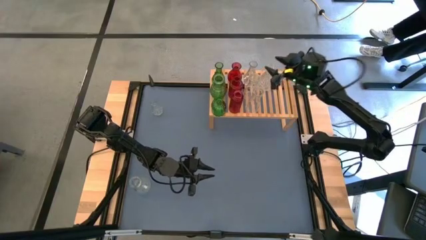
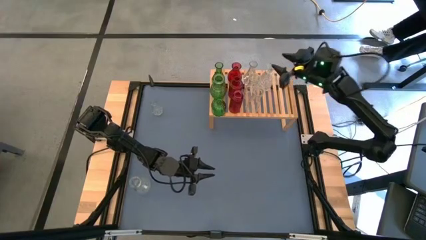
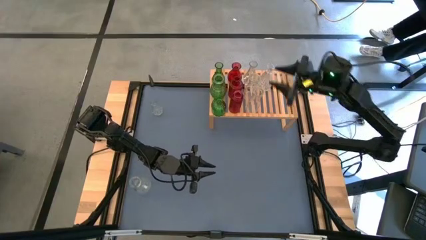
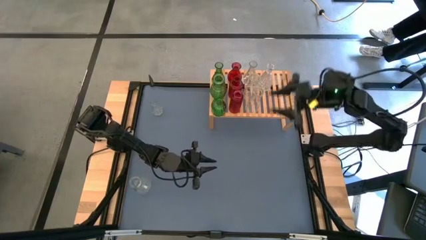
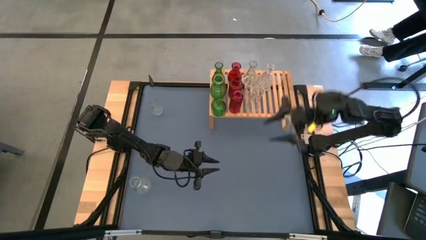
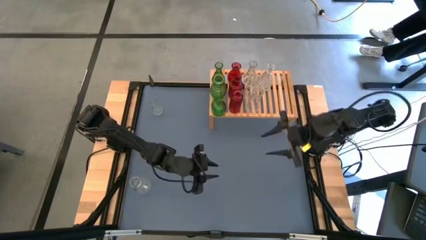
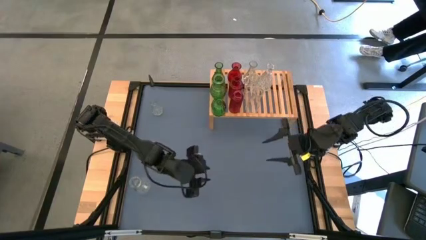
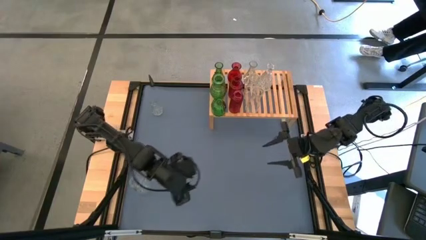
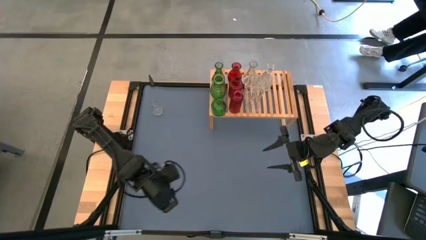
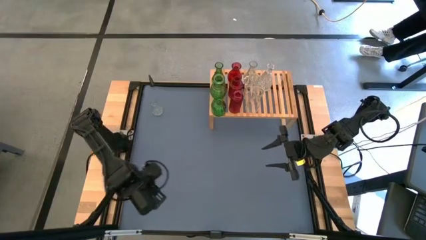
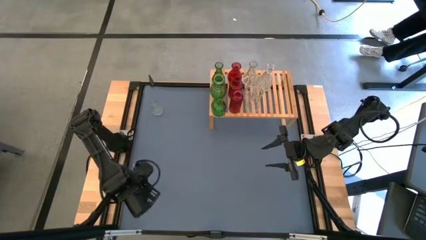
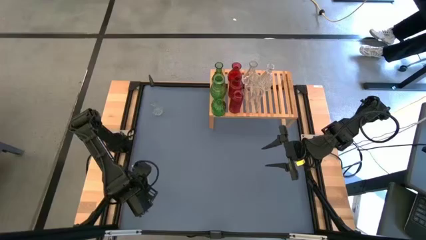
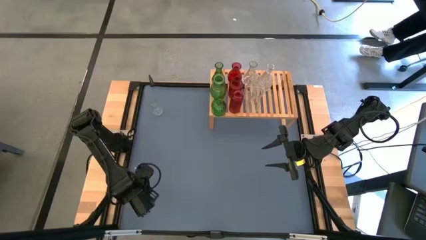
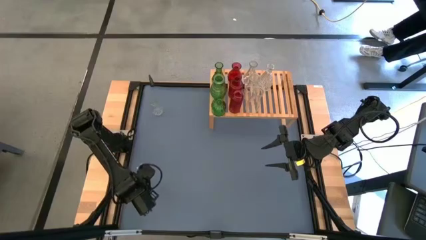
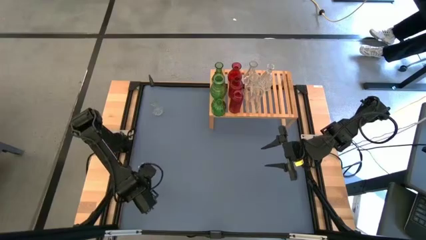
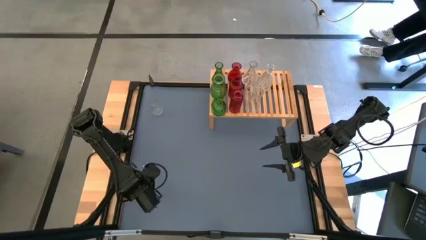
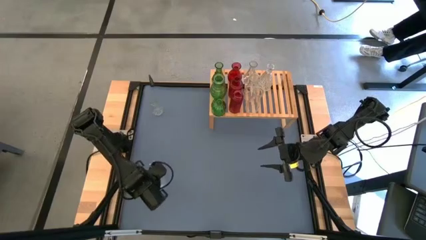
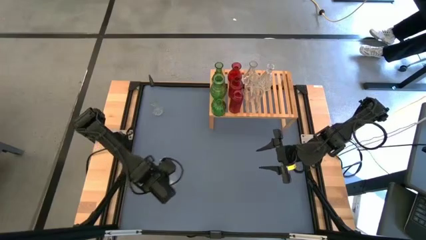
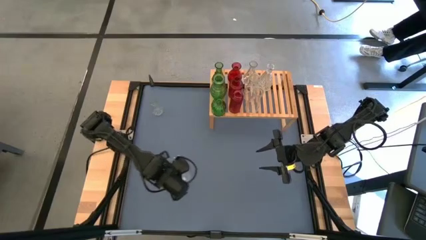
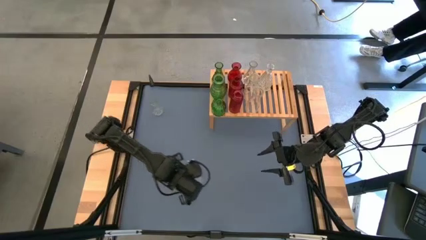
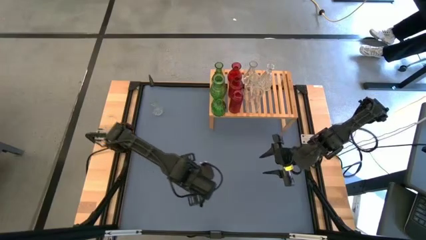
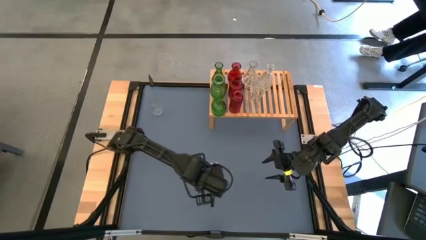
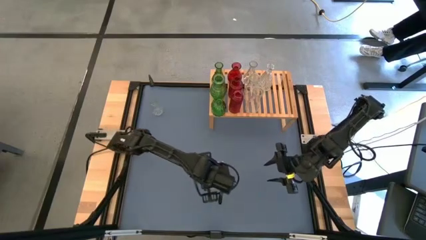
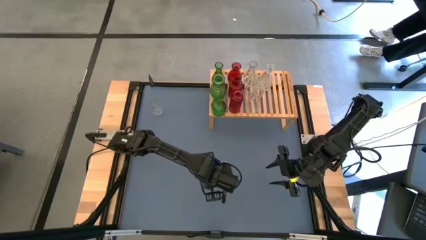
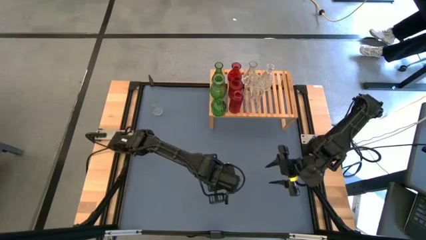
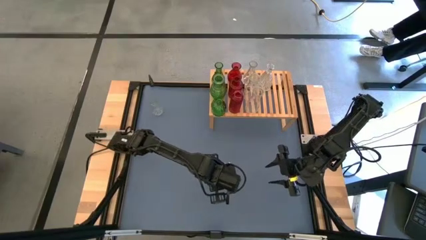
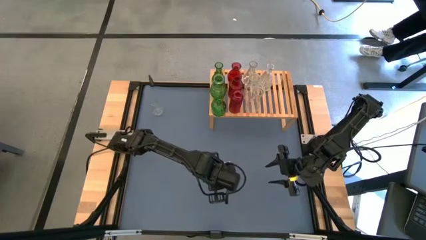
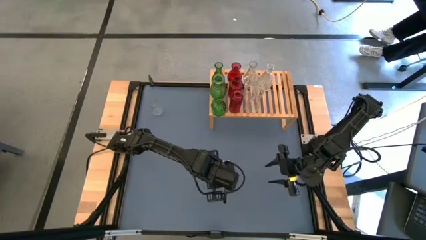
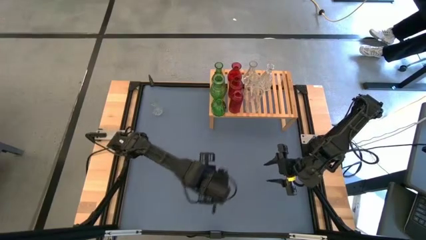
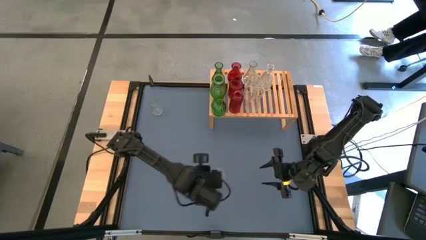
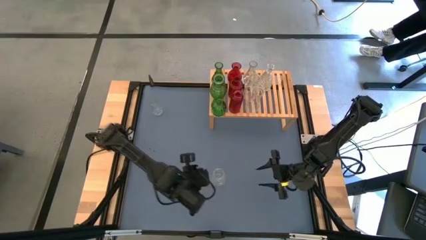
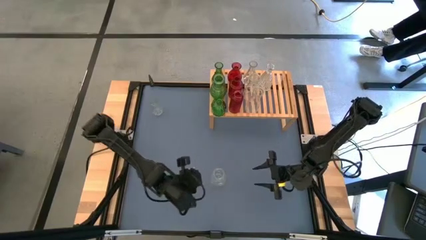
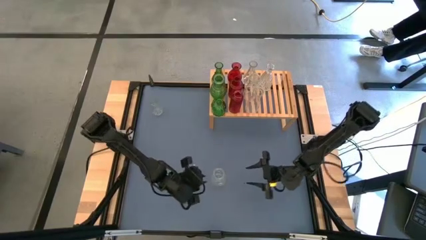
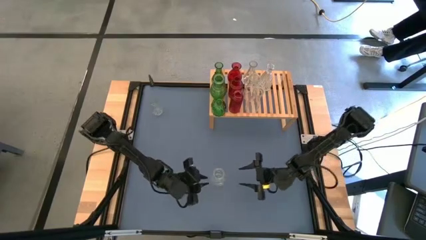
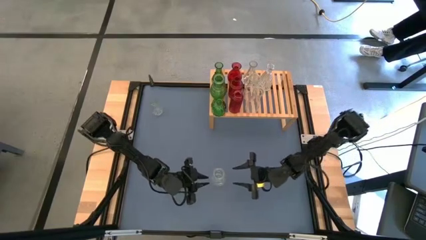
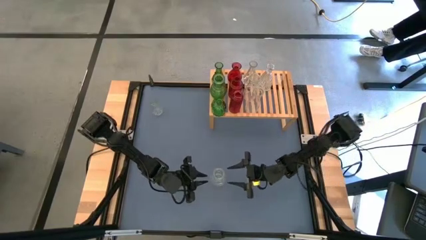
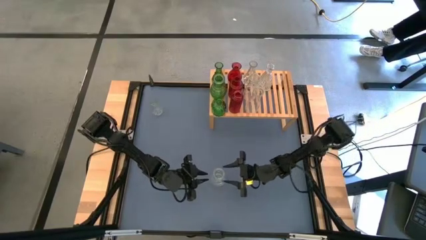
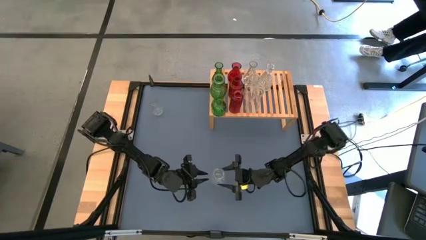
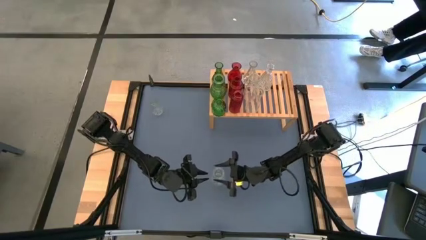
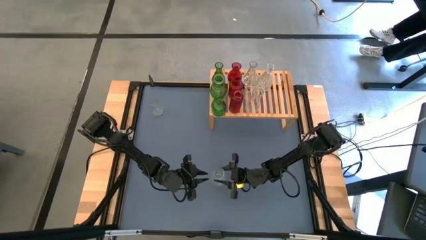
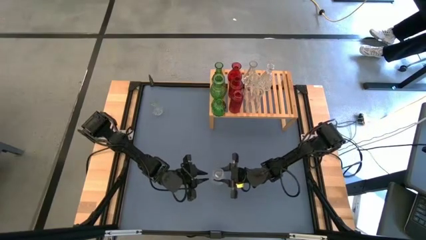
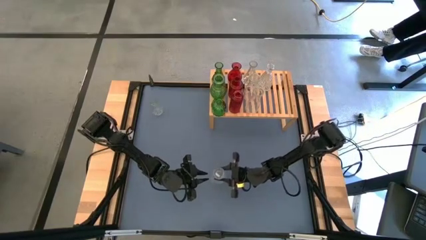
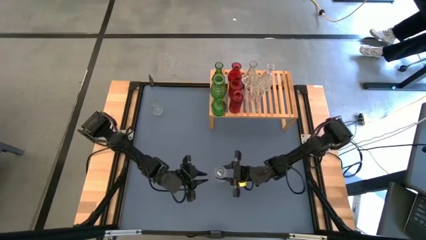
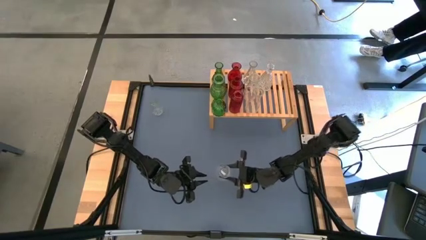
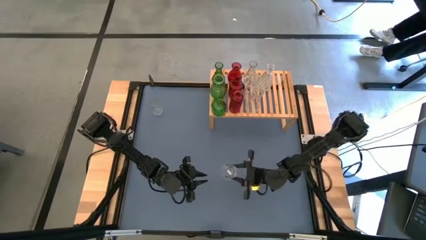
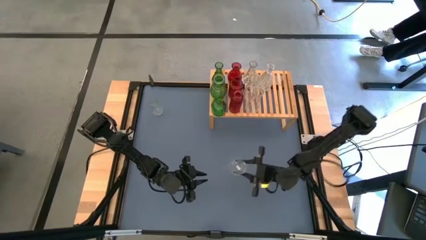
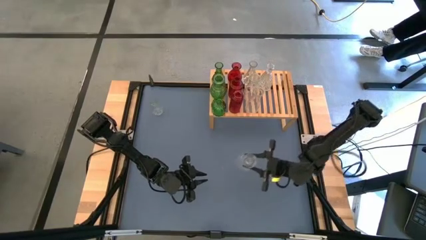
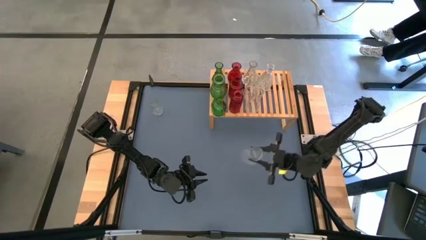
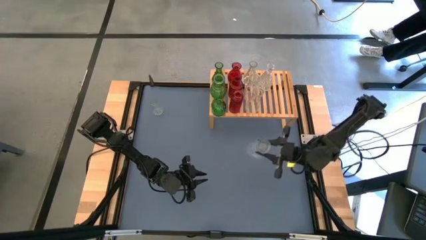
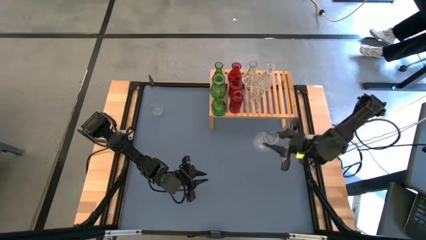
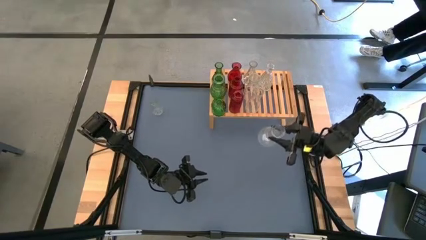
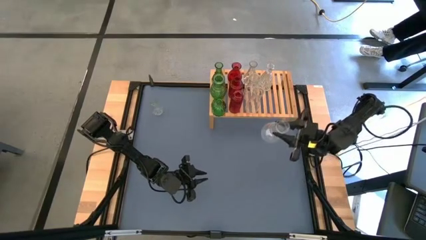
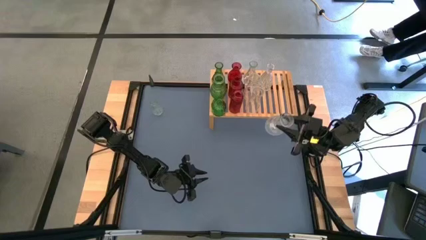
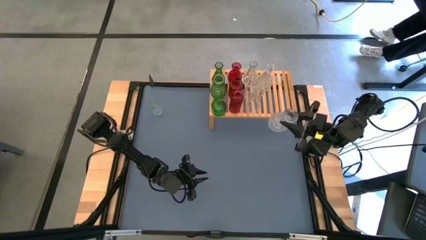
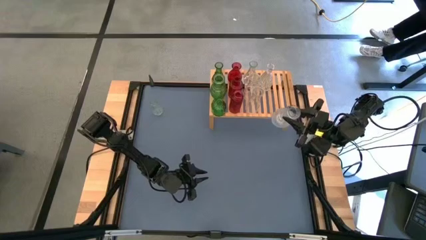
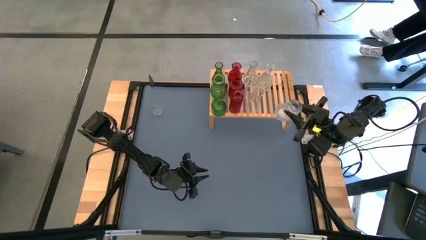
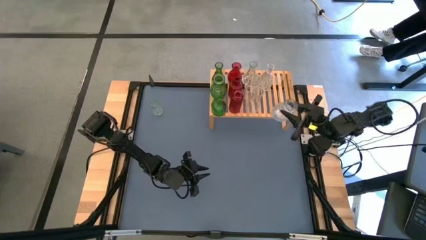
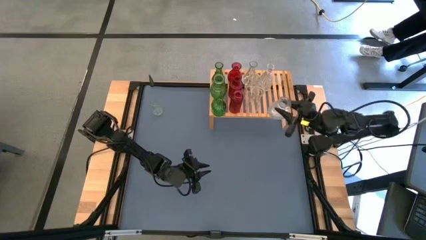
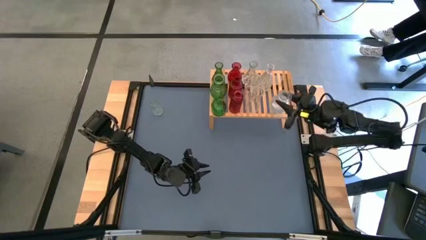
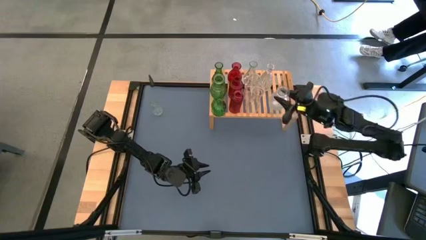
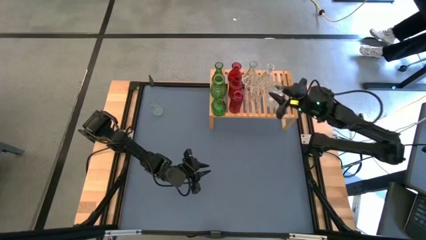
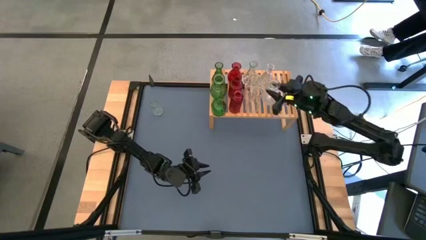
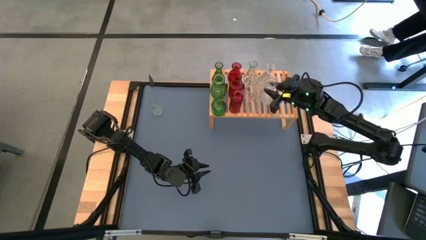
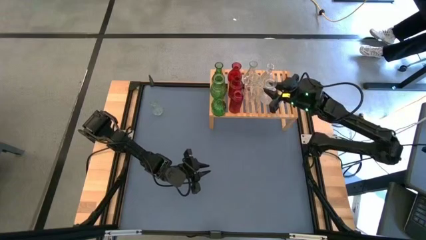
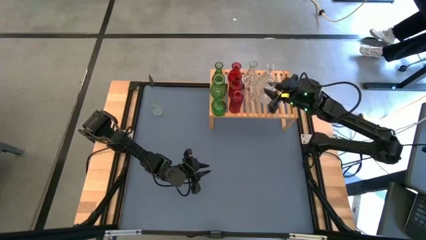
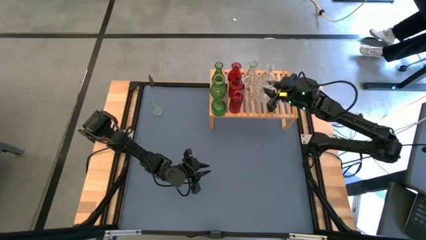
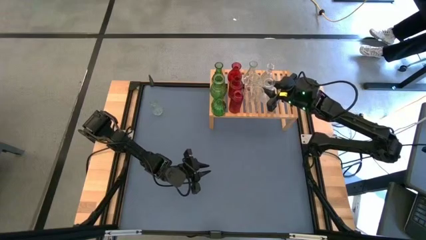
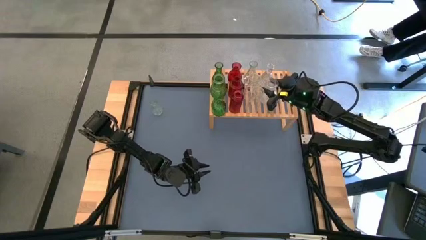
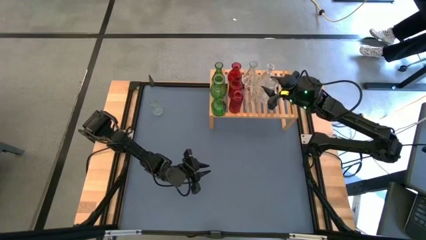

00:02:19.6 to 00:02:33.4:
Task: sort vases onto shelf
Put the bottom transparent vase on the shelf, aligned with the other transparent vase
